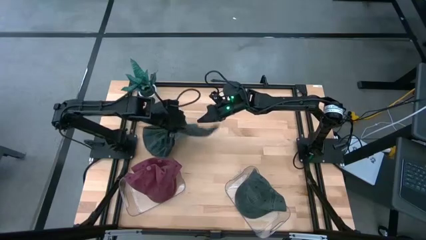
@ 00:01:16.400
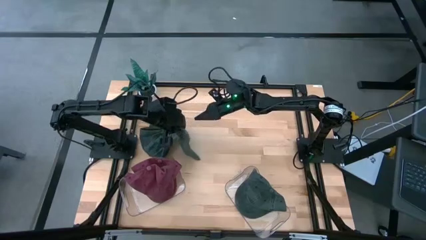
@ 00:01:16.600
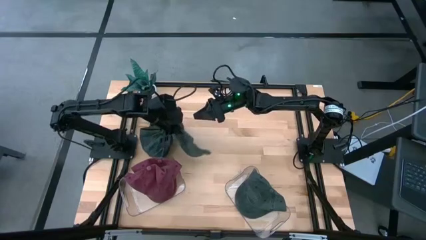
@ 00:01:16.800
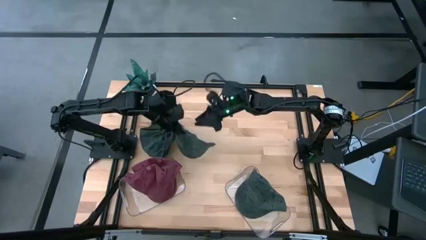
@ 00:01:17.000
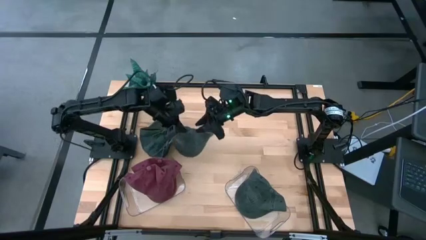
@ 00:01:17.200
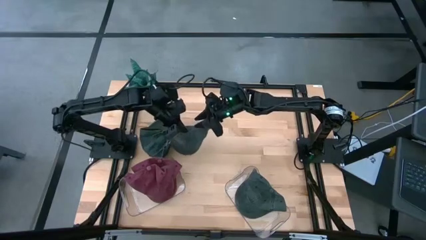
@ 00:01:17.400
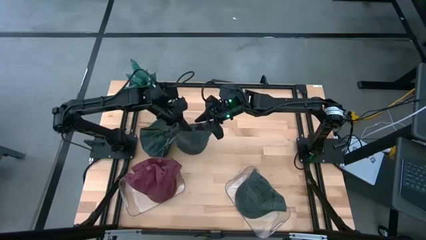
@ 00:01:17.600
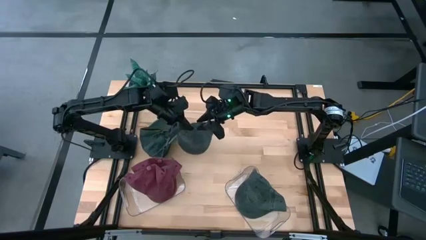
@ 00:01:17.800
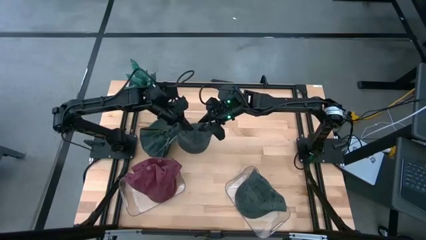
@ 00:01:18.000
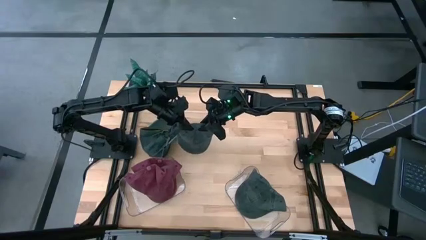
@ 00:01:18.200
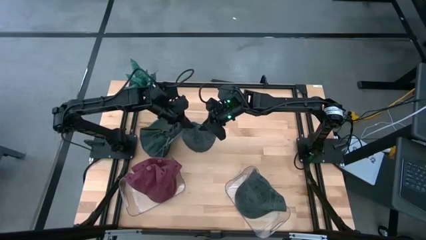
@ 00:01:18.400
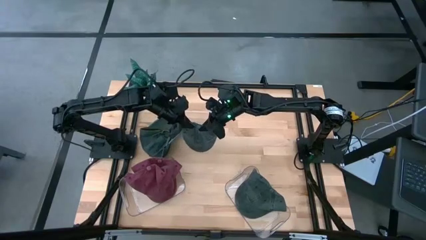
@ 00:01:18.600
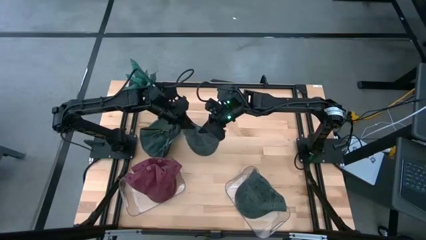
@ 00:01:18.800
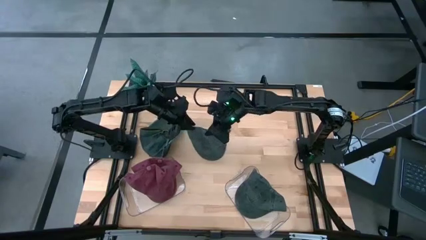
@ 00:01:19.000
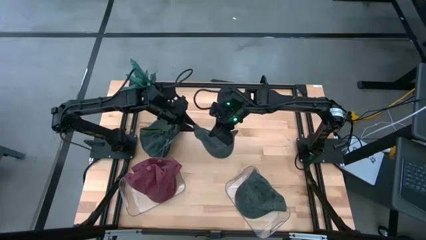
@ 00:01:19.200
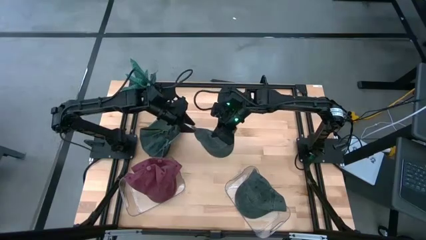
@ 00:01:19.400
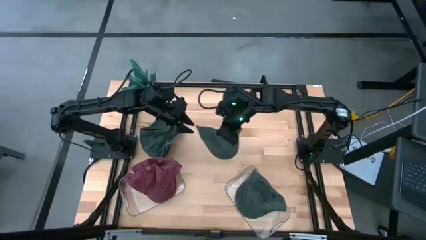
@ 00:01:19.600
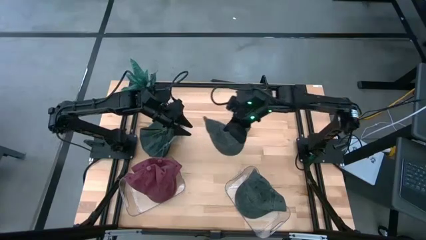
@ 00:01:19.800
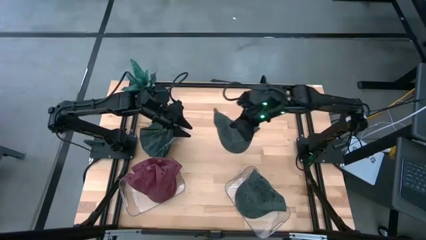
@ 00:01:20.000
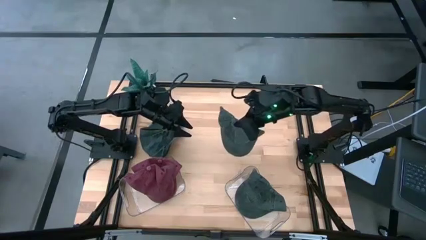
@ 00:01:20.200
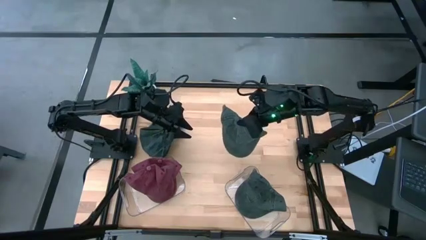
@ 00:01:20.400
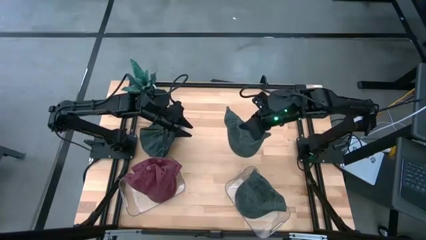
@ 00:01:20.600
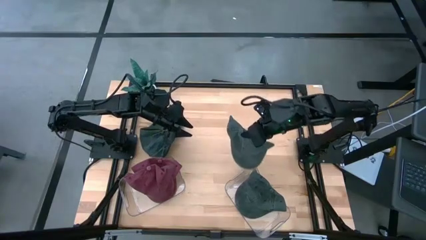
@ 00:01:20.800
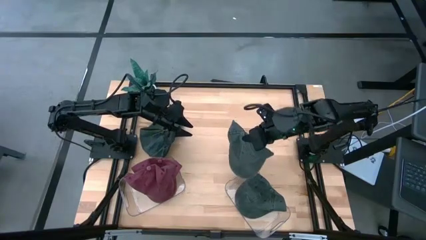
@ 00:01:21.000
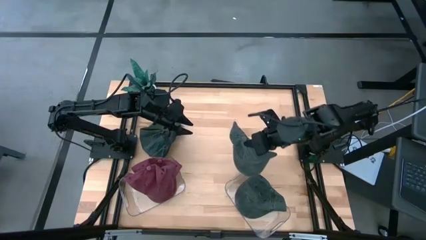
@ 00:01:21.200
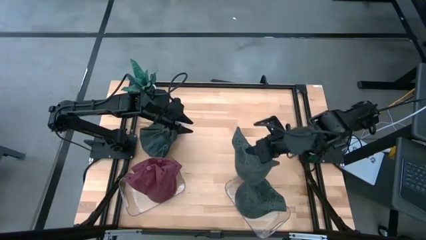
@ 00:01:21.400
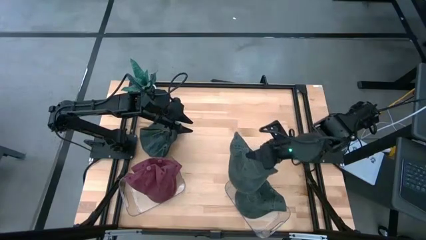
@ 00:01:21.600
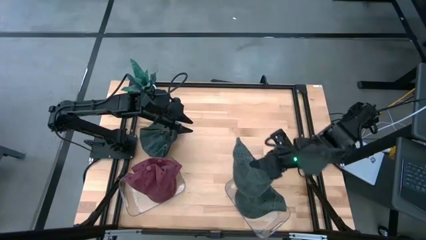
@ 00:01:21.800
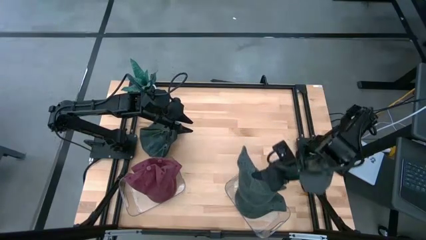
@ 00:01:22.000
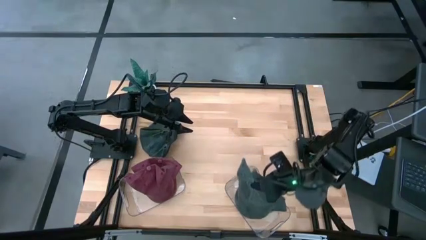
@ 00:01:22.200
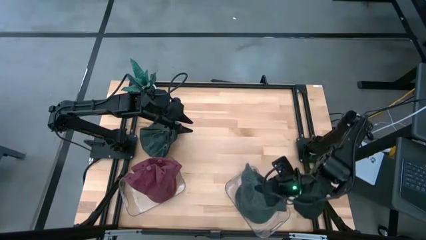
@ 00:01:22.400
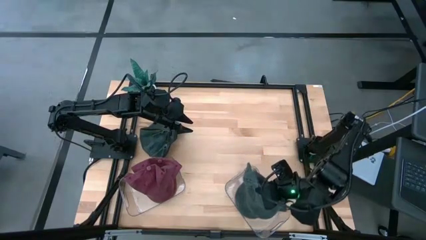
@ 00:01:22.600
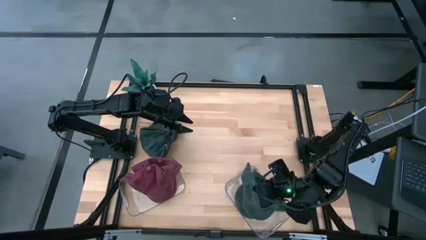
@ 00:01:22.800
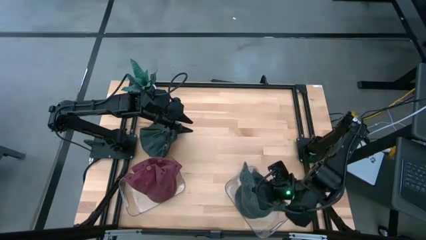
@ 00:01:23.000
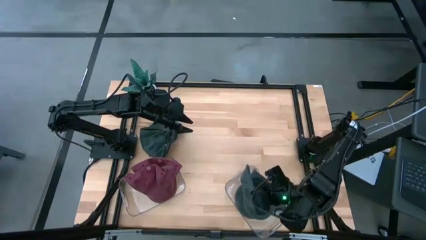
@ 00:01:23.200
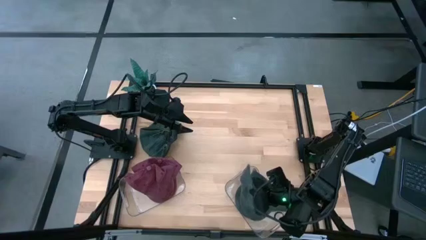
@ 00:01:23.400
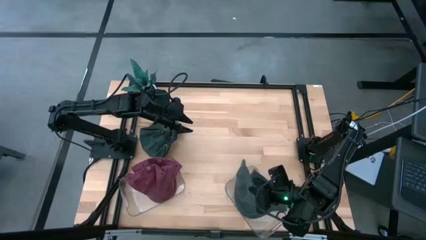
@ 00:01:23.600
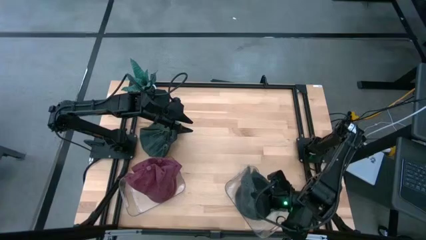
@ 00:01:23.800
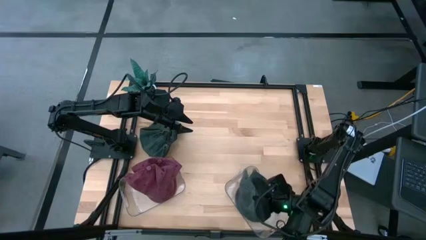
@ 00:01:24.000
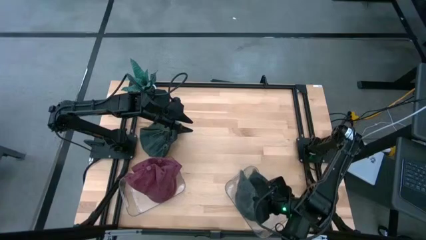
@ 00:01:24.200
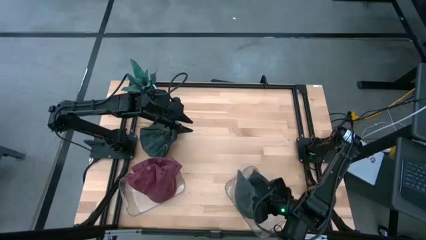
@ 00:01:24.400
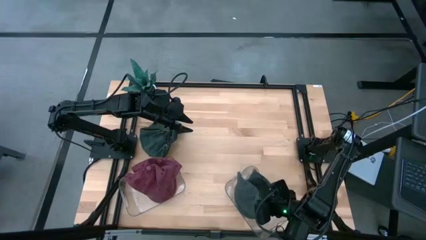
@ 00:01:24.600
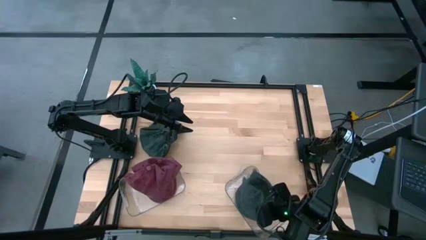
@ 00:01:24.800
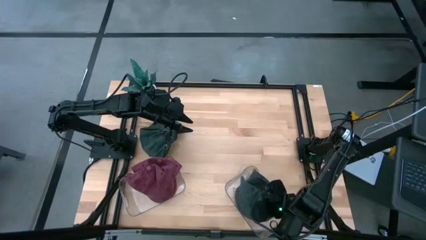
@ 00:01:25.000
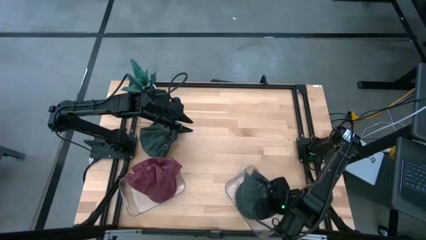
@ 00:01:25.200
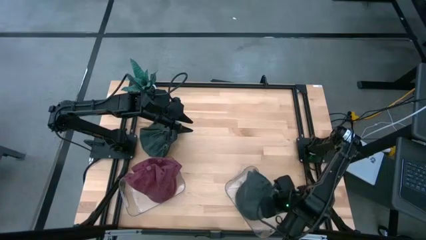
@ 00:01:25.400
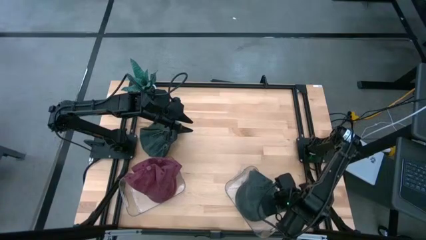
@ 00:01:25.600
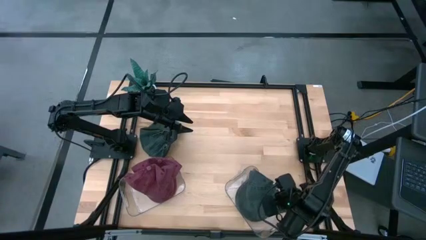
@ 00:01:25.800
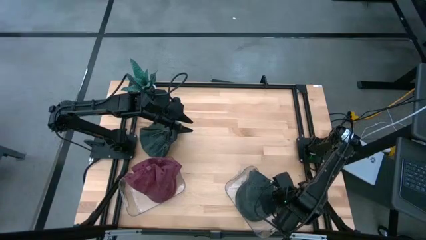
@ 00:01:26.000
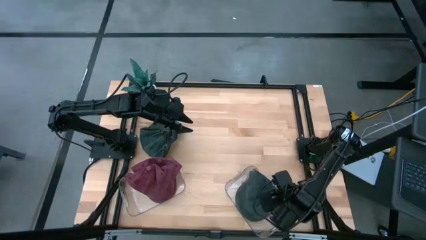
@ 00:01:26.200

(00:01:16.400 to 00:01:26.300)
Task: Pick & Place hat
Put the right black cap into the right transparent bin

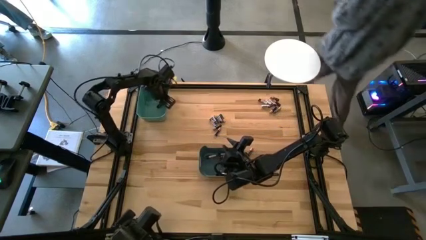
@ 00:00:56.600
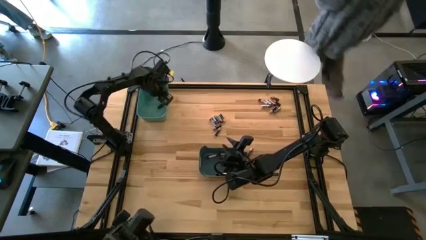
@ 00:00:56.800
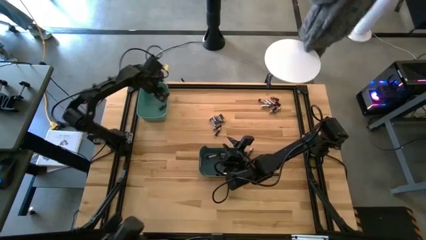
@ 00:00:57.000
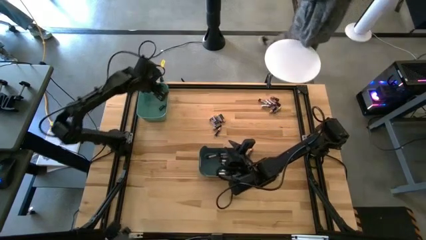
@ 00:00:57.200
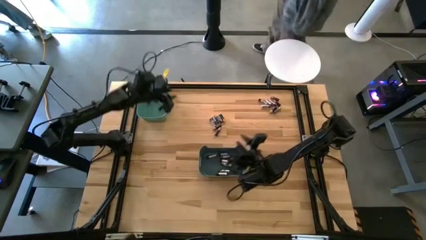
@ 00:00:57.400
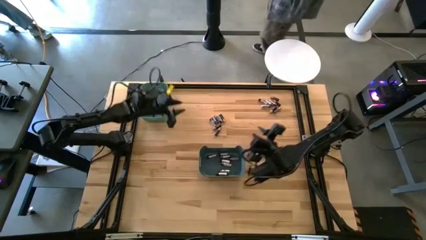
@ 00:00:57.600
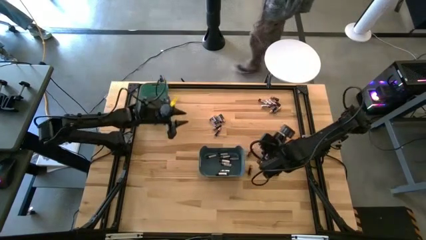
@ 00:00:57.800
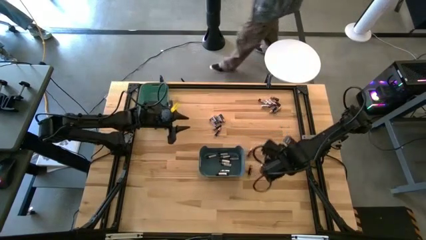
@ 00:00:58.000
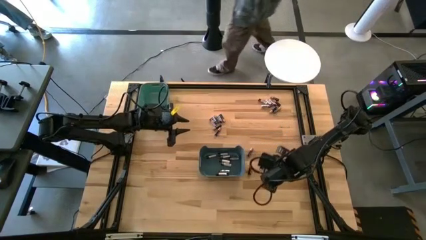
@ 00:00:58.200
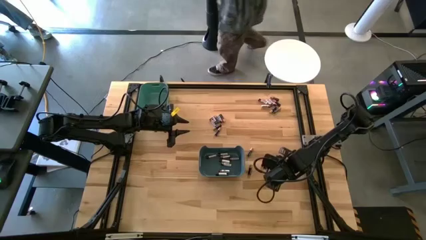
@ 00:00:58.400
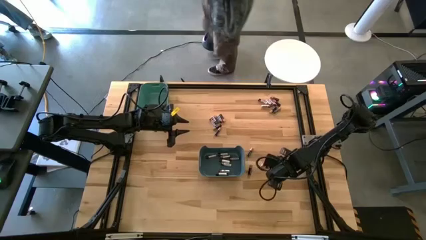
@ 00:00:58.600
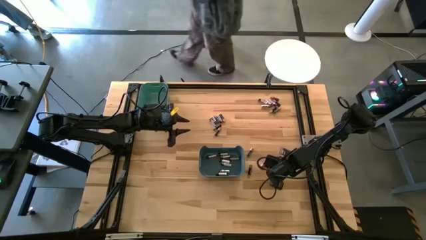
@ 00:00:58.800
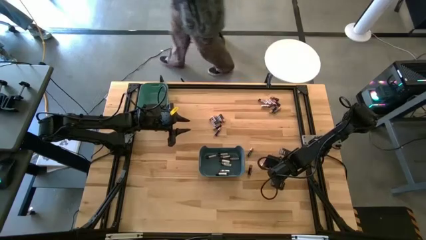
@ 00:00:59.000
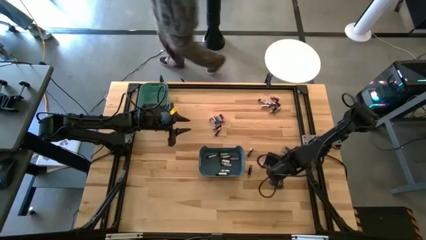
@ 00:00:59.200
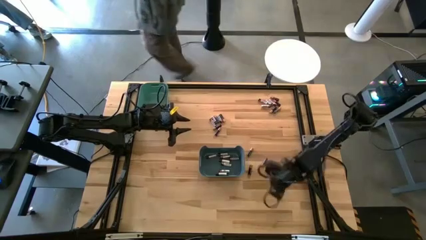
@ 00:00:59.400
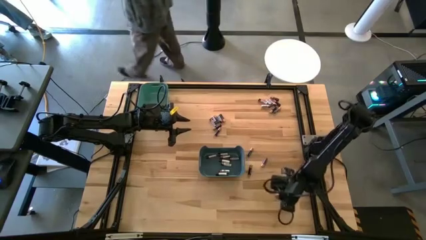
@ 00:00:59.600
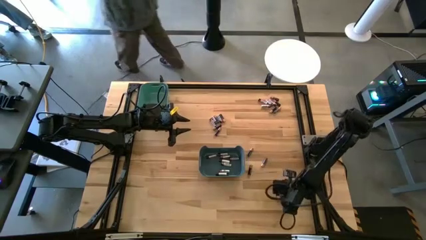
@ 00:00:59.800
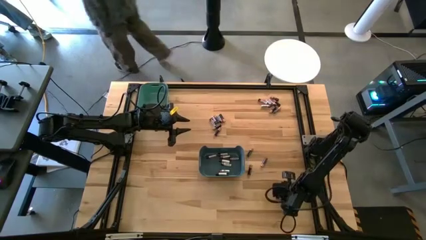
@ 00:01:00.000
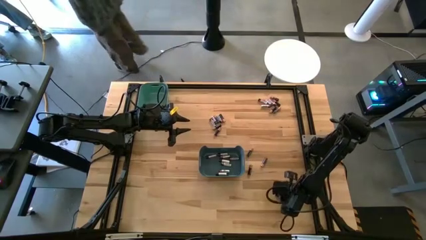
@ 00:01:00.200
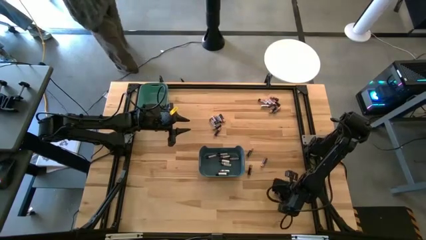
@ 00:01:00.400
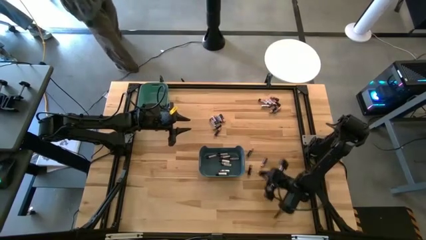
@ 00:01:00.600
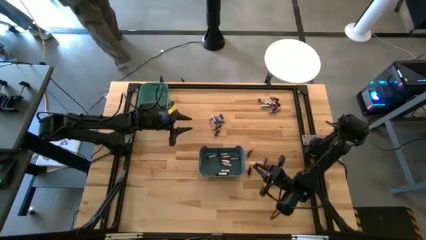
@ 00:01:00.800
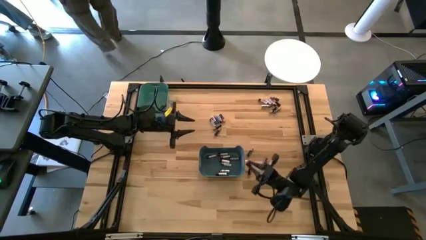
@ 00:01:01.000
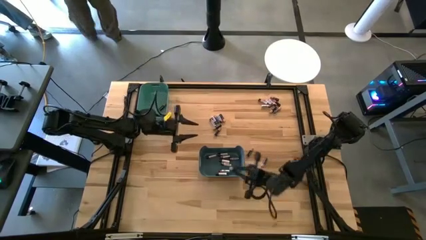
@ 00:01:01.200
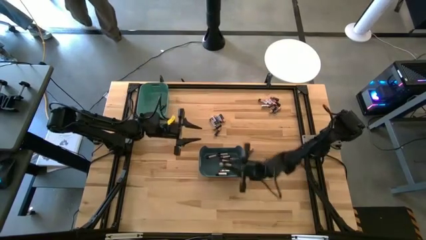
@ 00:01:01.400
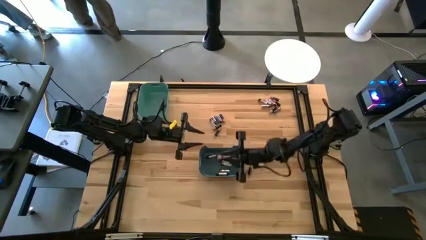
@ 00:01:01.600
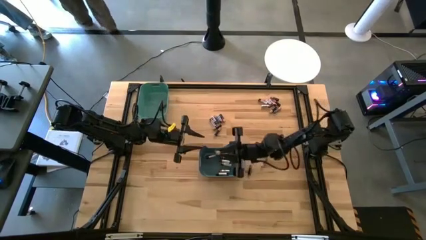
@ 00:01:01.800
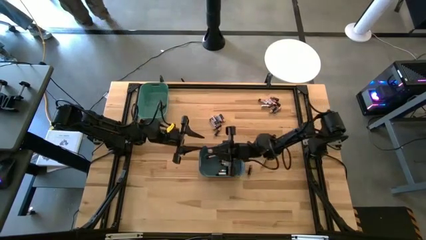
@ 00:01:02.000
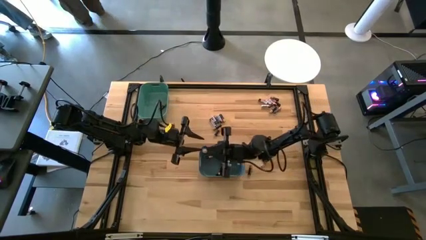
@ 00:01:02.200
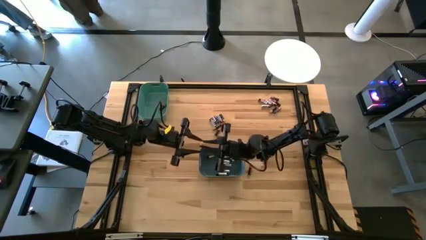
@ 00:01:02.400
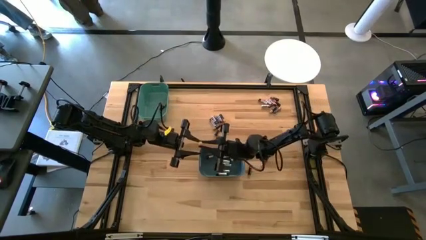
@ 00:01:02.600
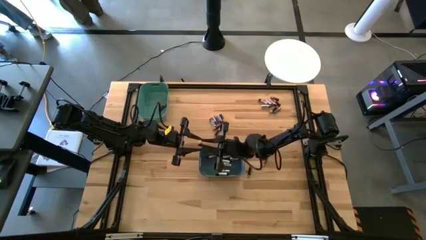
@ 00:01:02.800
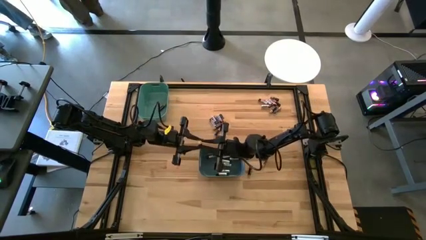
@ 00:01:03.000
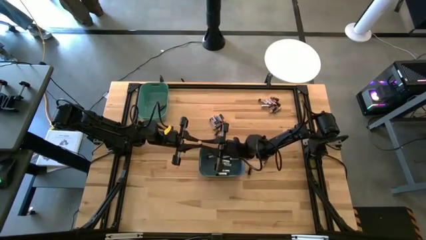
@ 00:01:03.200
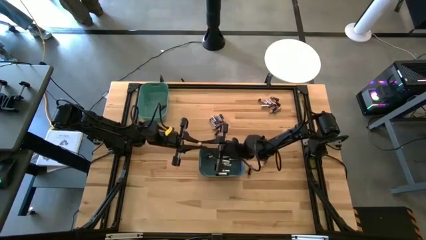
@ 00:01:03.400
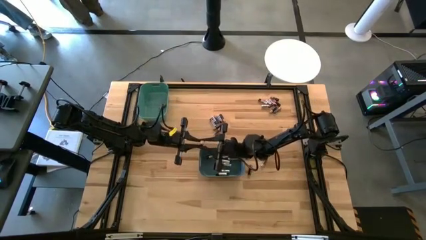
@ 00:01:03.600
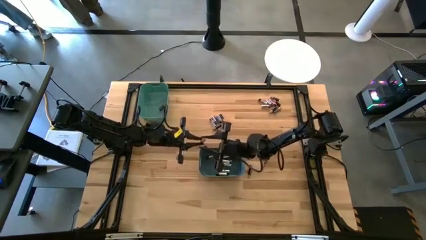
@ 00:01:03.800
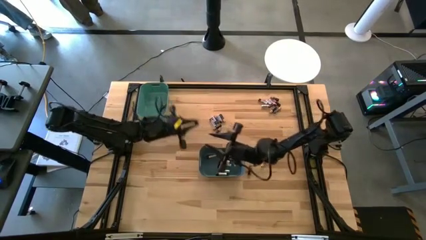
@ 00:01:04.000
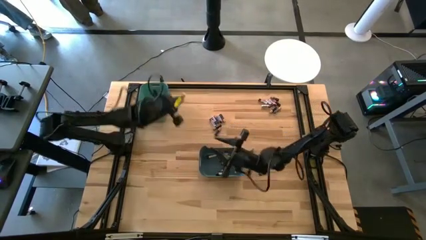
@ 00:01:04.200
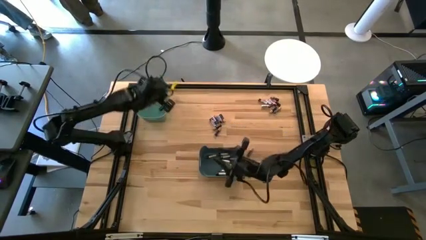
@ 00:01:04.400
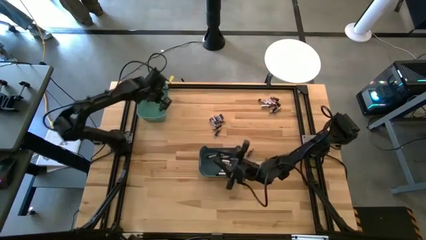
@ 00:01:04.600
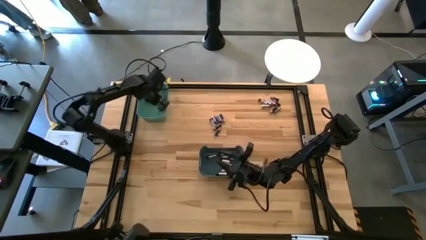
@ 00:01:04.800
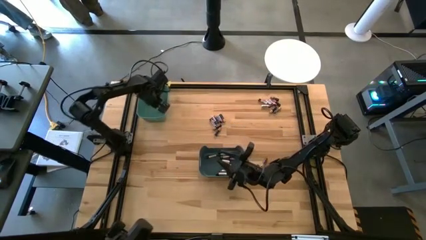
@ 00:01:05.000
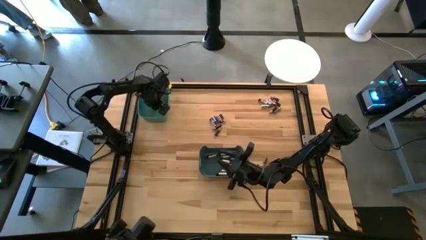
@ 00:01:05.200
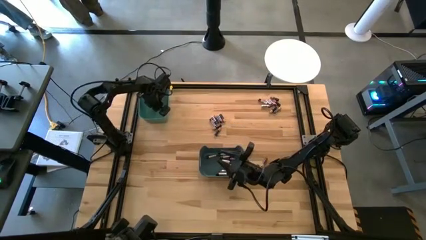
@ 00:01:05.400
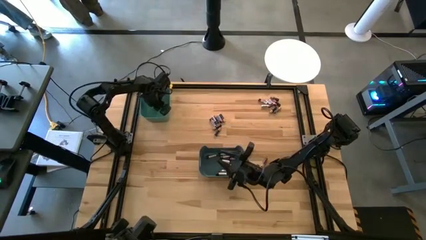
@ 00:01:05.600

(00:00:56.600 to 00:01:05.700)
Task: Sort batteries
Put the black battery into the green bin
